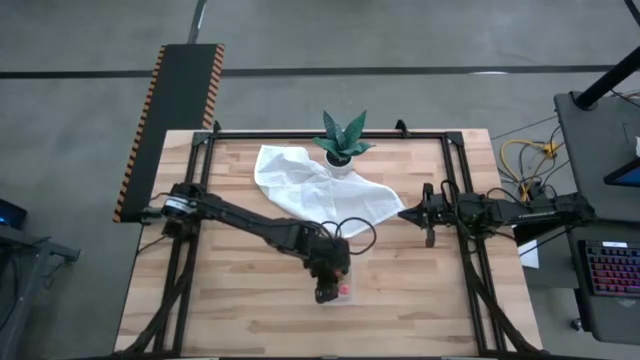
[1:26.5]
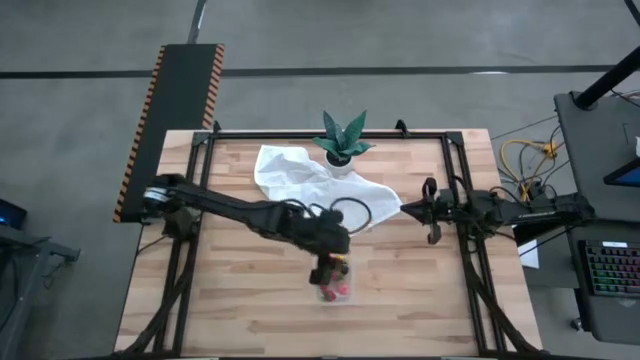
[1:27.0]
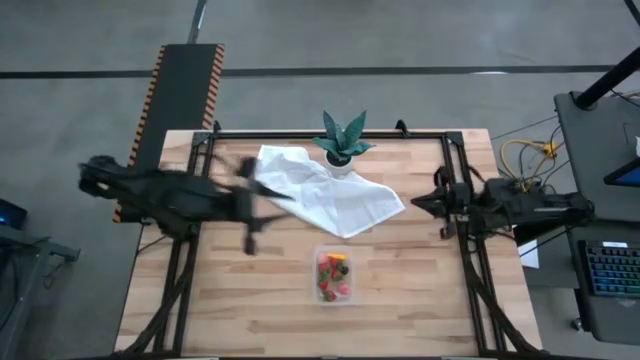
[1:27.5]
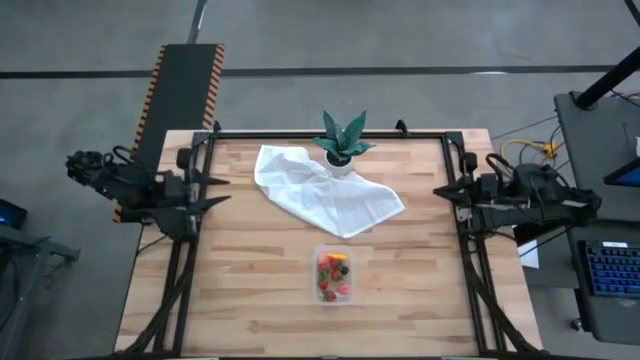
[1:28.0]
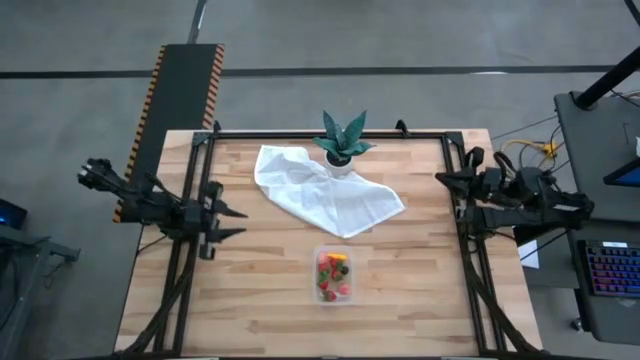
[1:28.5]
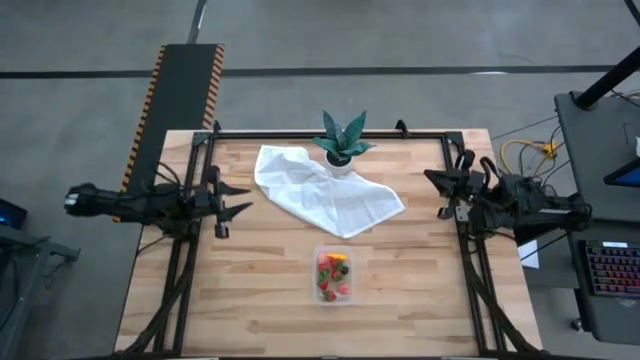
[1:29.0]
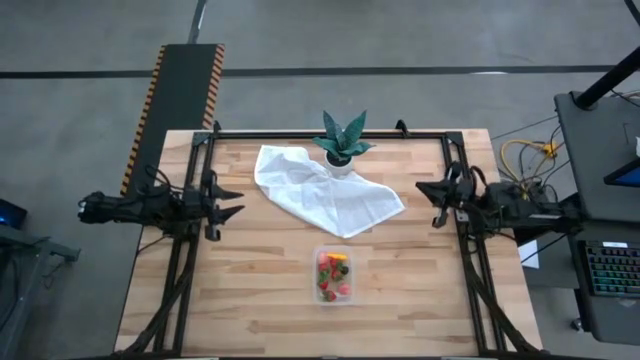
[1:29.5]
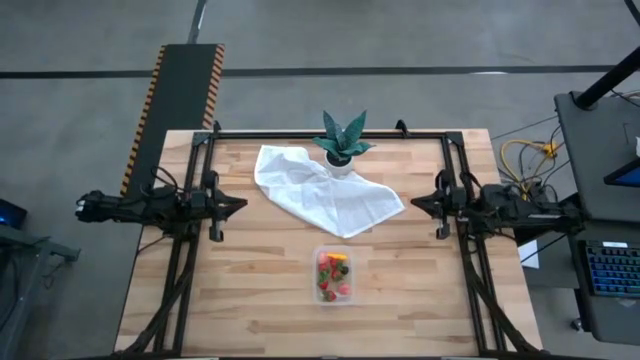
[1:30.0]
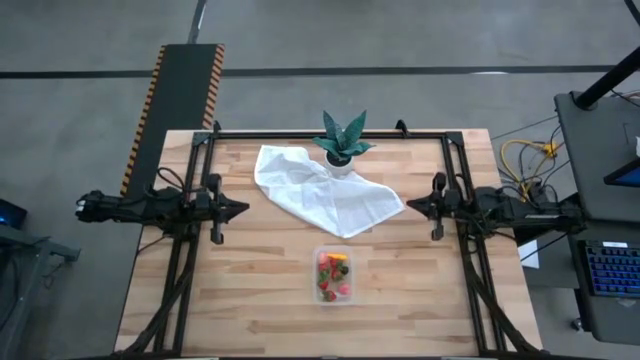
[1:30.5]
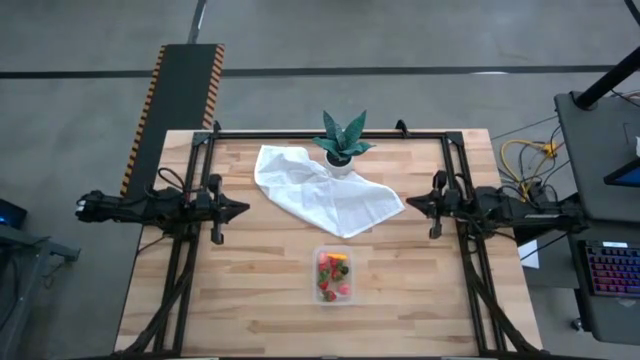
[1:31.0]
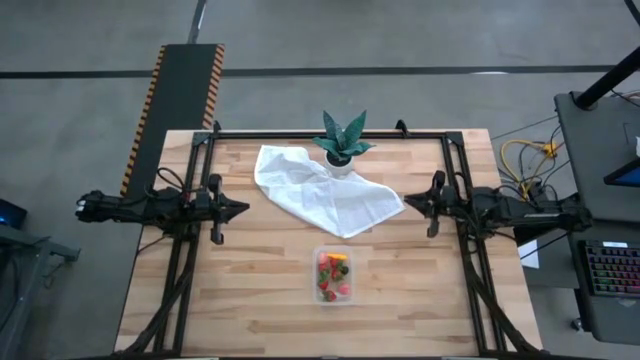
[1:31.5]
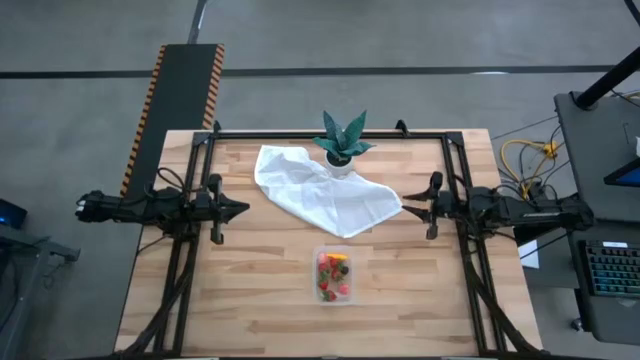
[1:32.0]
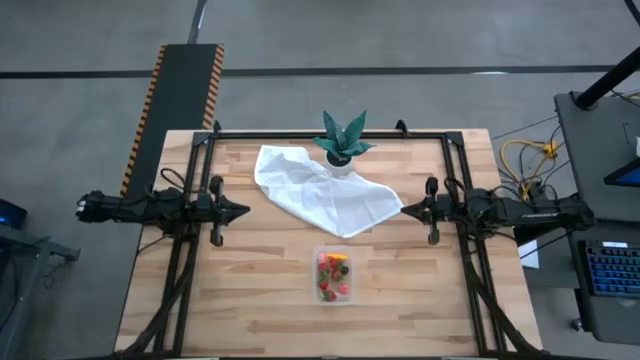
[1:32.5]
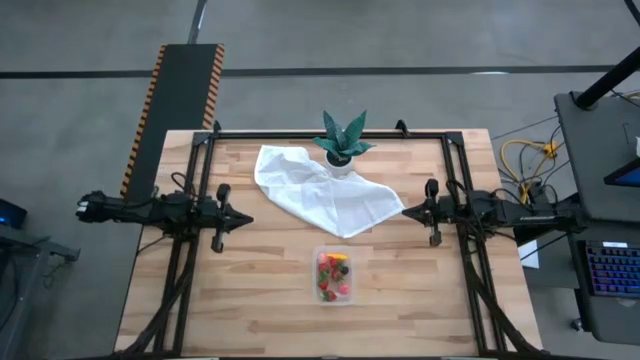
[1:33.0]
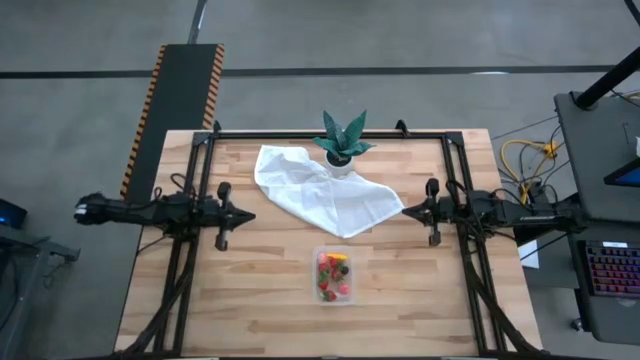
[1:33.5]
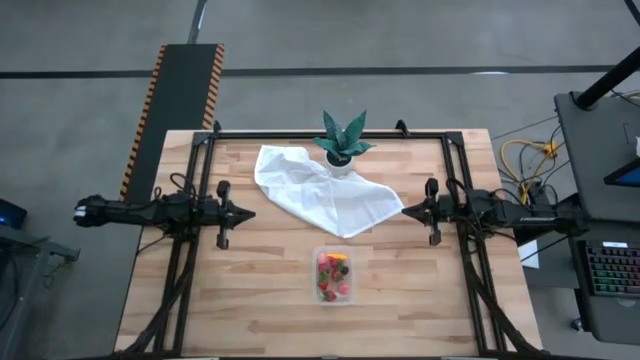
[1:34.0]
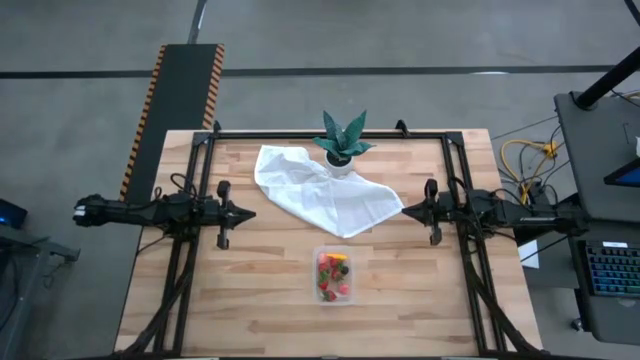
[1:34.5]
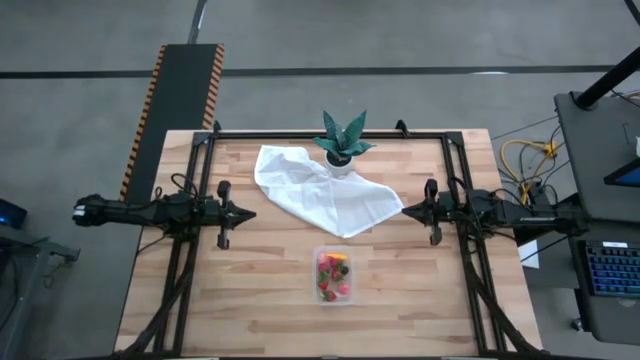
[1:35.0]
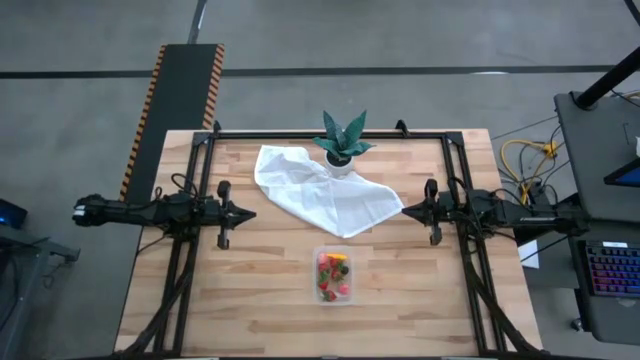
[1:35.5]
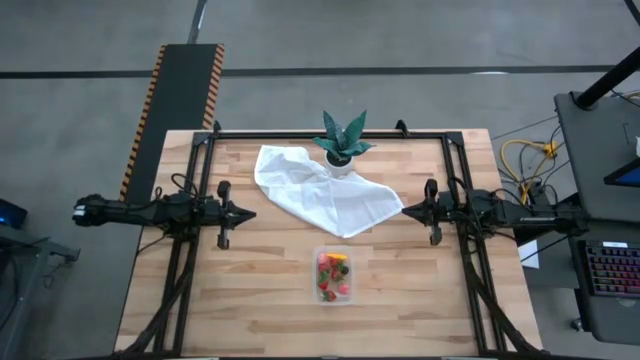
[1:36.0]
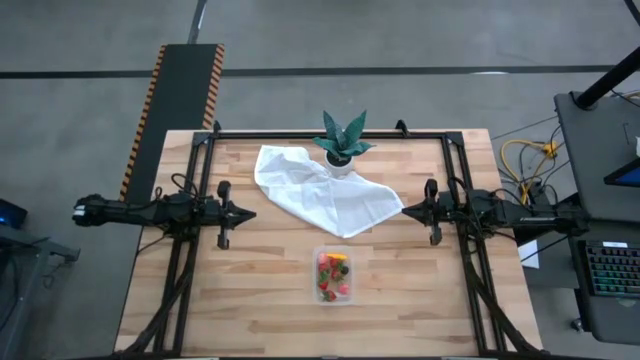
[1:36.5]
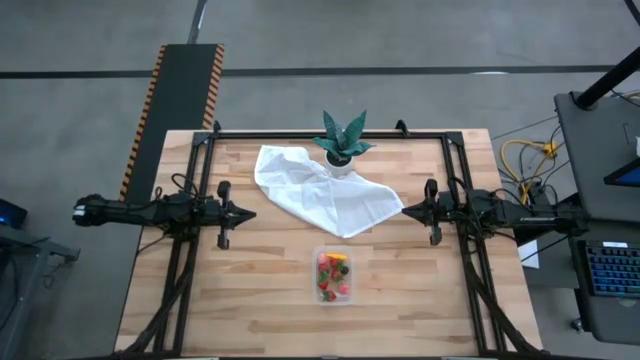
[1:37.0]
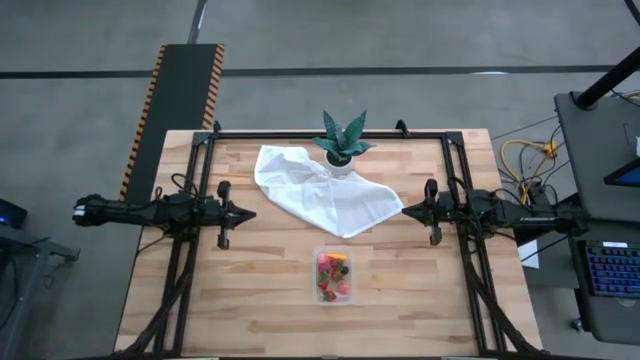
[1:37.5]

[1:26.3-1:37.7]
Task: Pick and placing Produce into tupperware
Return to Home Position

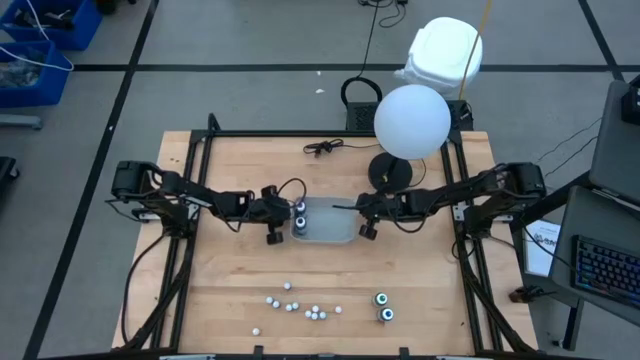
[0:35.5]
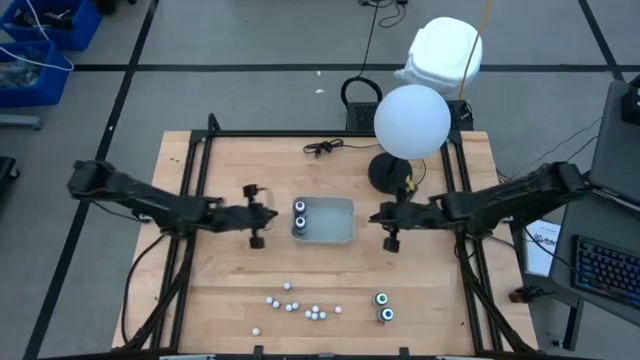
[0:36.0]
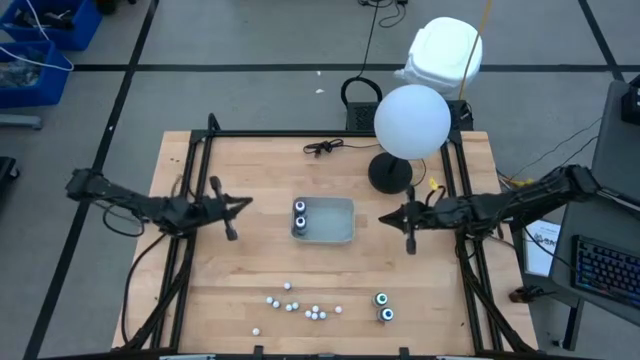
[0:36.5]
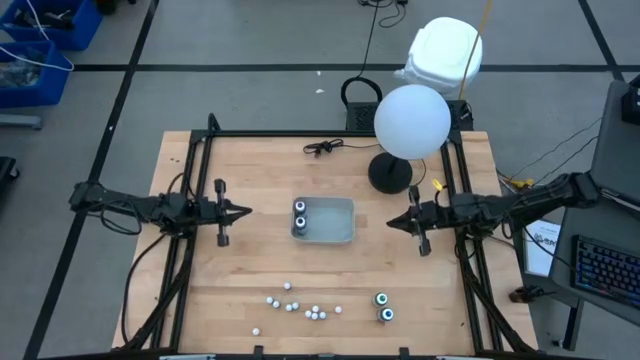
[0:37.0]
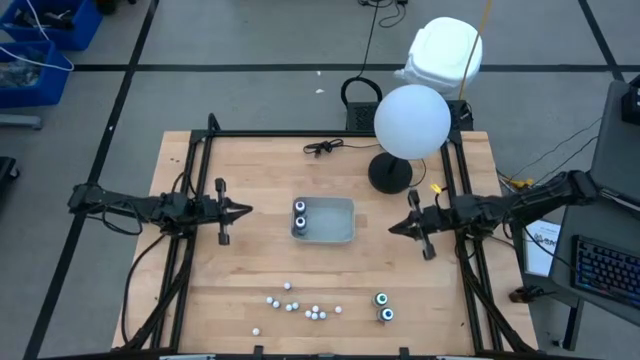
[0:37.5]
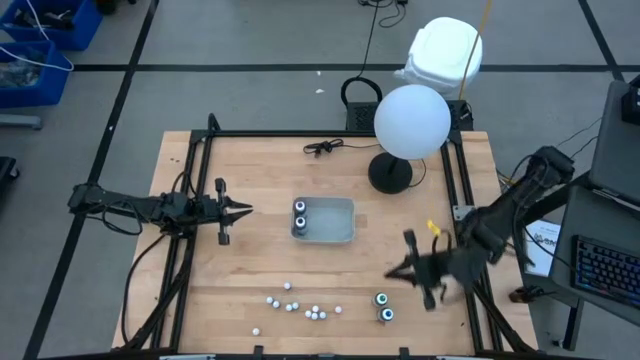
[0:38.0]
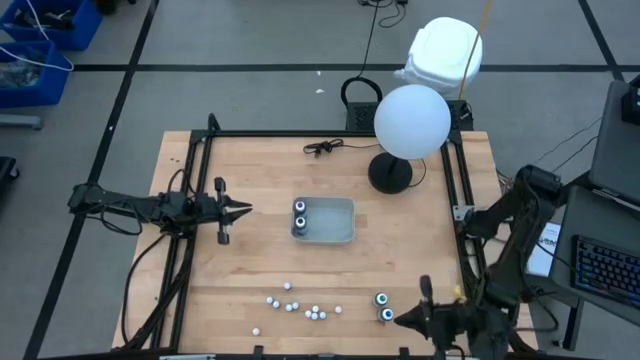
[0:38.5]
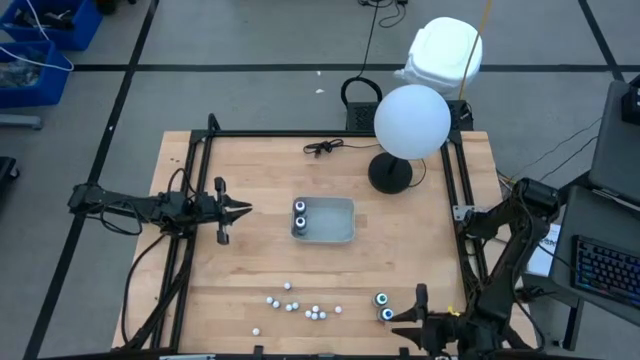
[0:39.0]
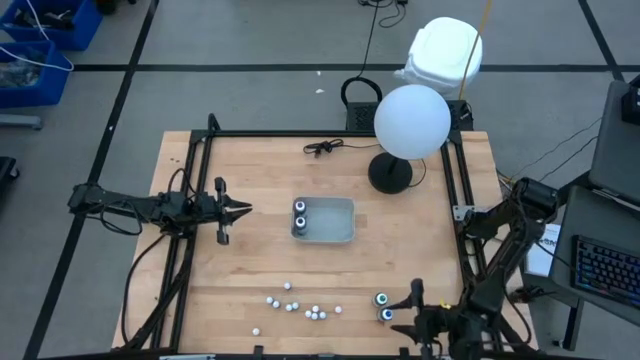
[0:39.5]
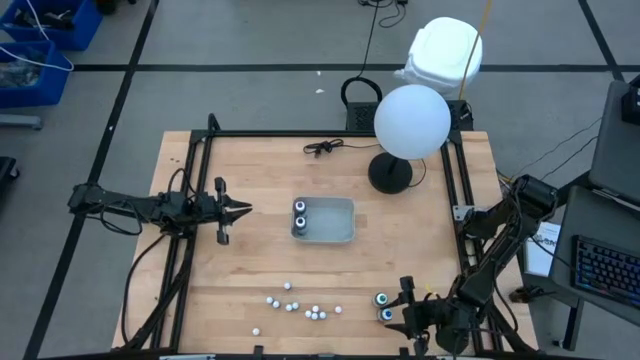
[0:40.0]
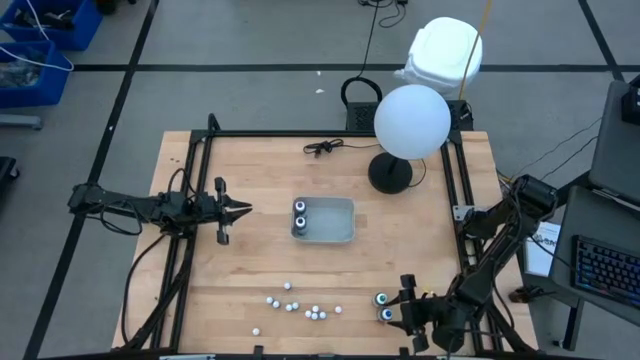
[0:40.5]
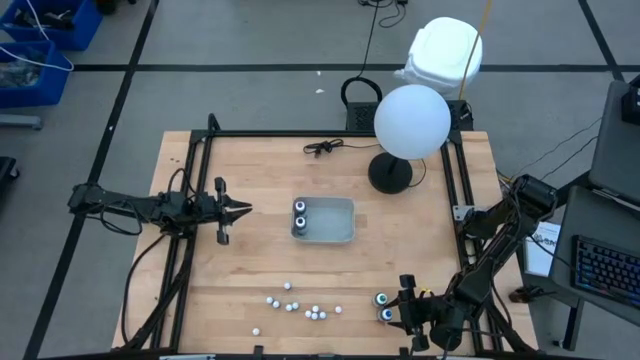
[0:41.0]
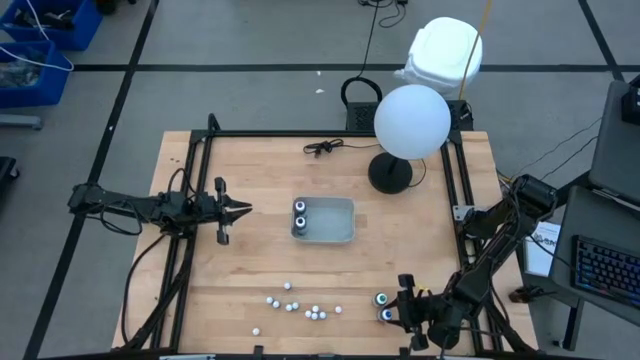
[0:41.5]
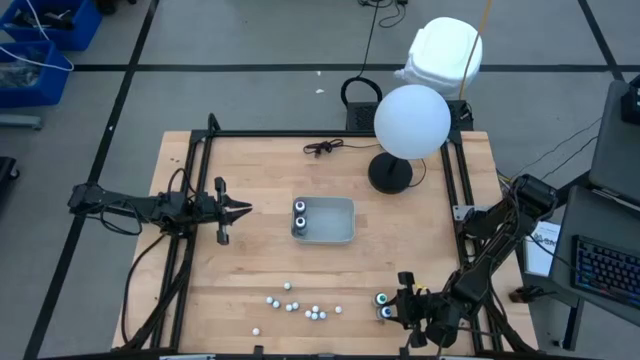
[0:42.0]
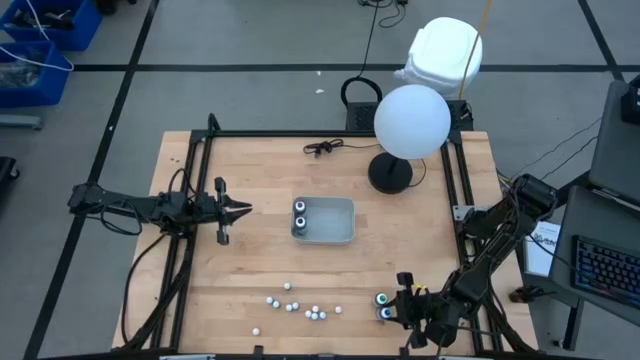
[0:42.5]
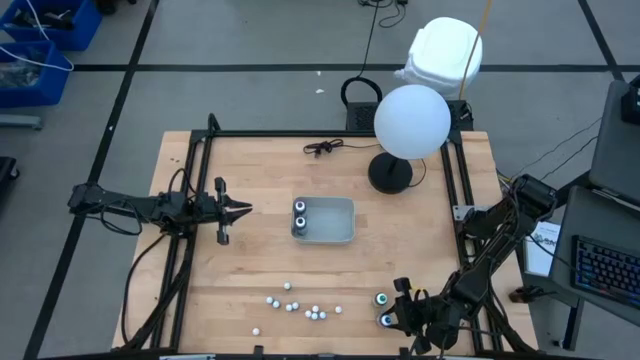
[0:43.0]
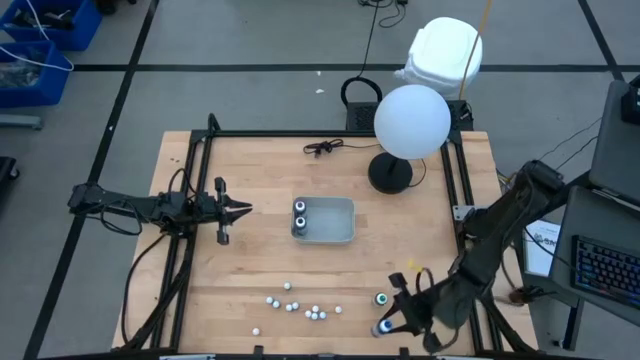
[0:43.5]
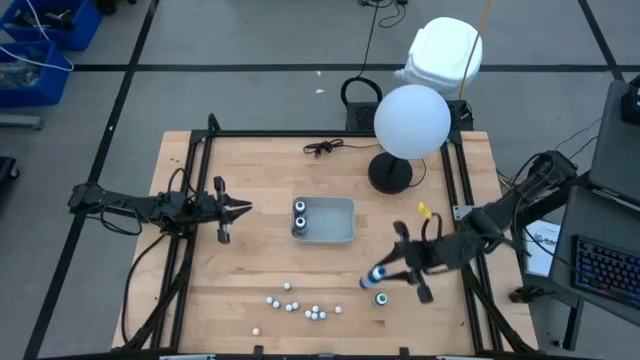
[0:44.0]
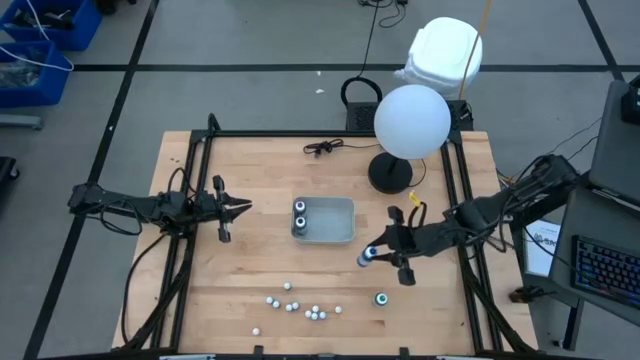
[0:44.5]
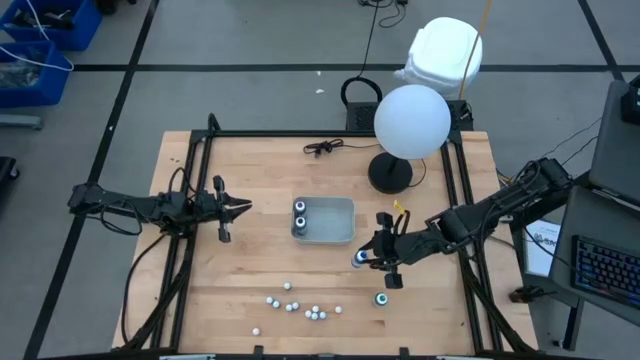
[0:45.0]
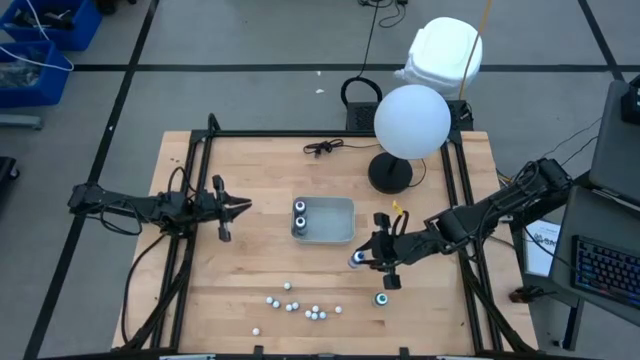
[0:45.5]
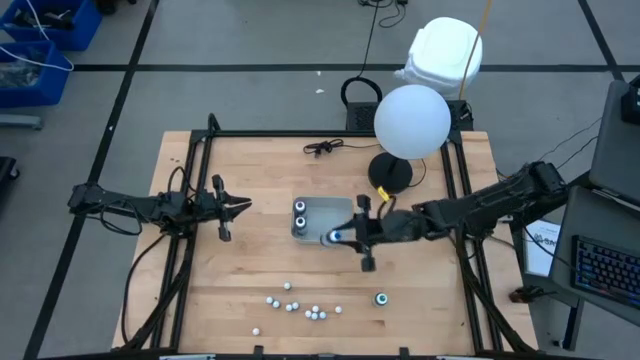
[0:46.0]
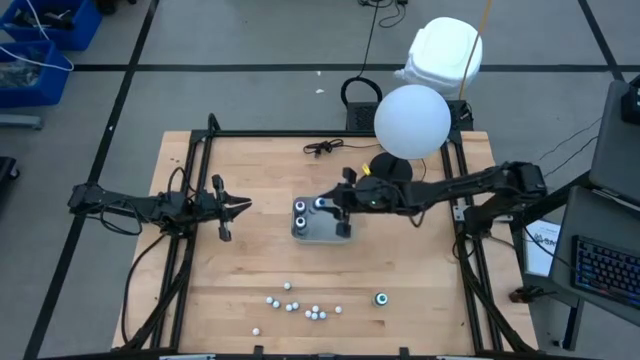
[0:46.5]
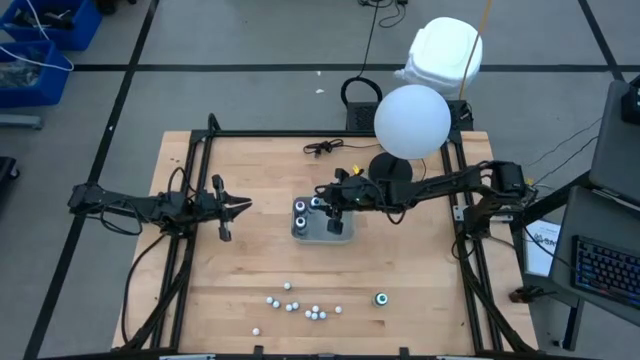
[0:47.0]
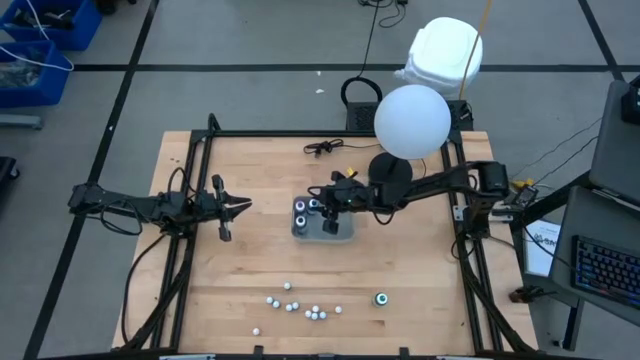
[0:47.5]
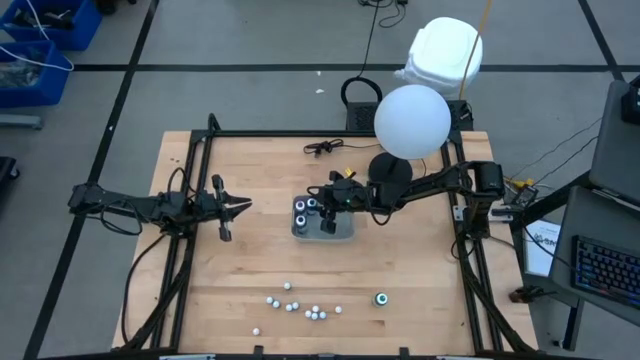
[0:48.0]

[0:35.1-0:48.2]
Task: Pick & Place food coloring
Put the large blue food coloring bottle into the gray bin
